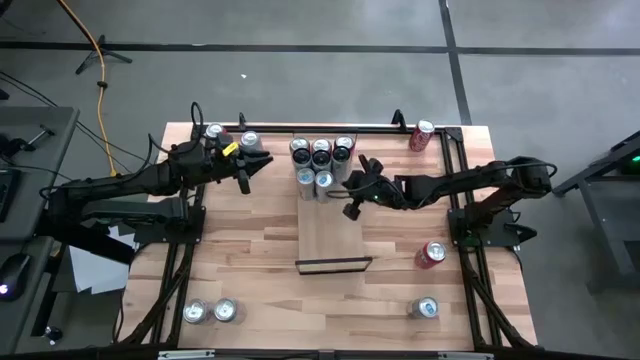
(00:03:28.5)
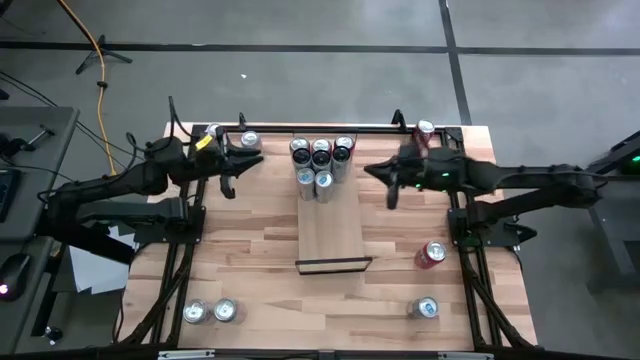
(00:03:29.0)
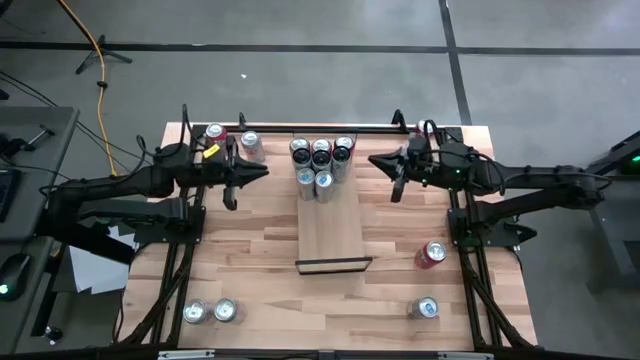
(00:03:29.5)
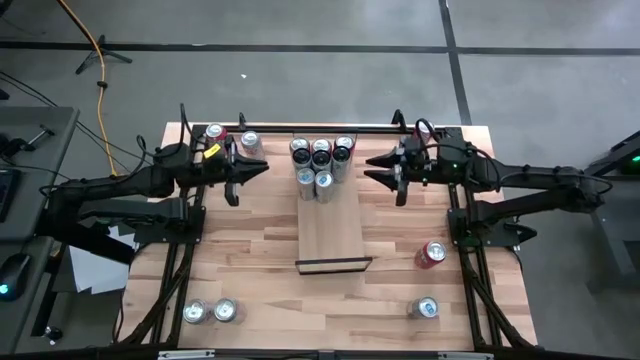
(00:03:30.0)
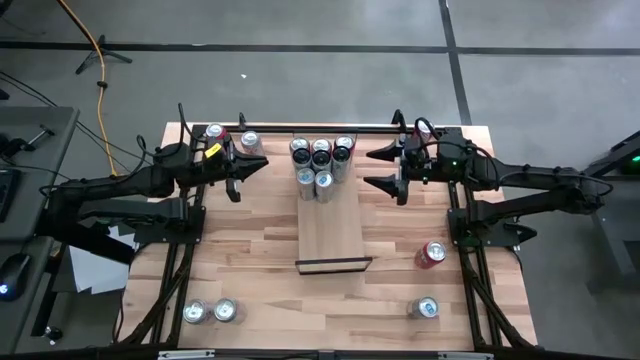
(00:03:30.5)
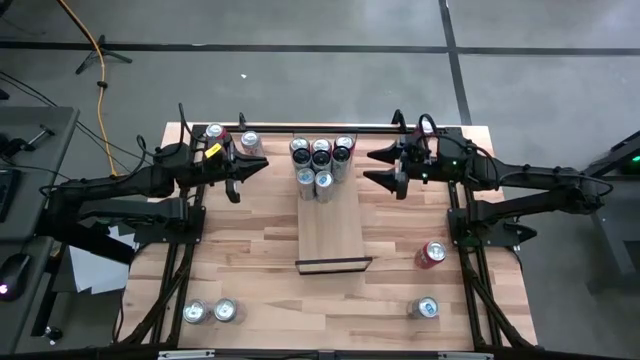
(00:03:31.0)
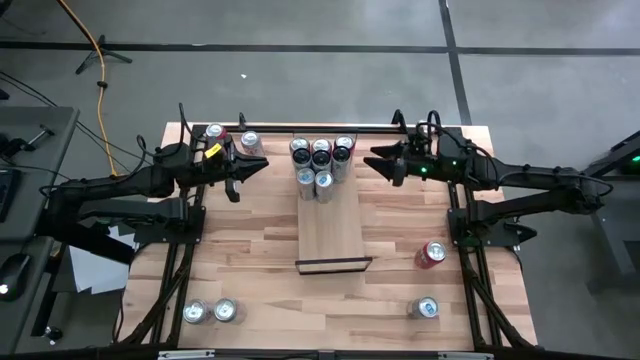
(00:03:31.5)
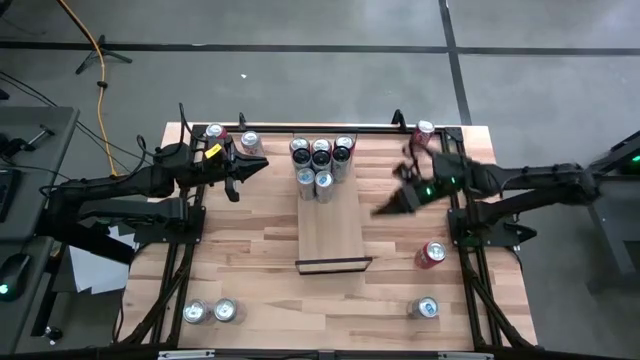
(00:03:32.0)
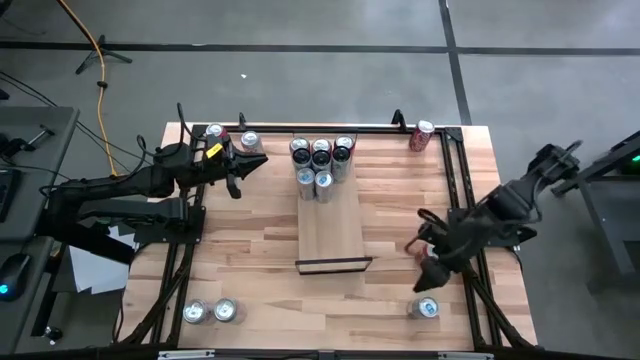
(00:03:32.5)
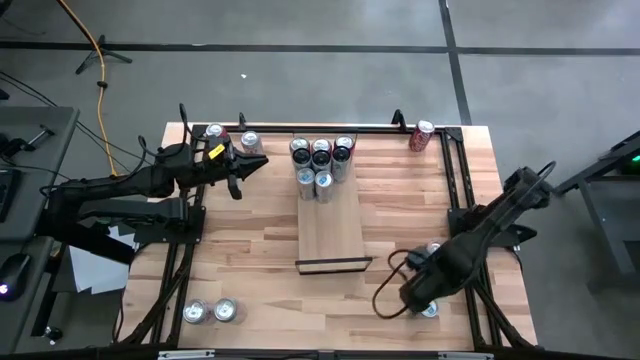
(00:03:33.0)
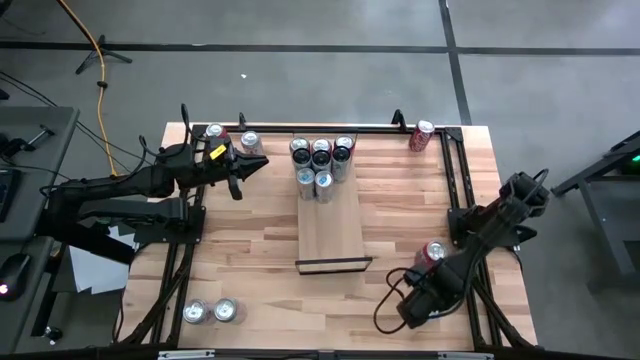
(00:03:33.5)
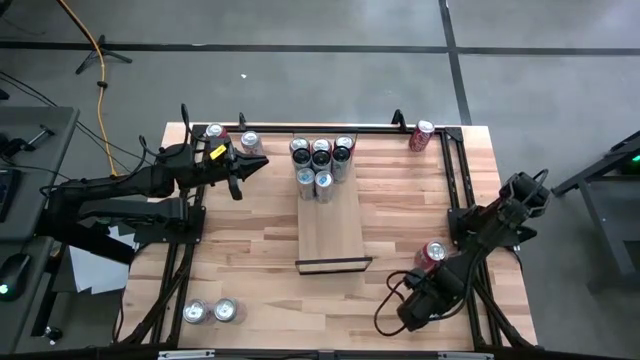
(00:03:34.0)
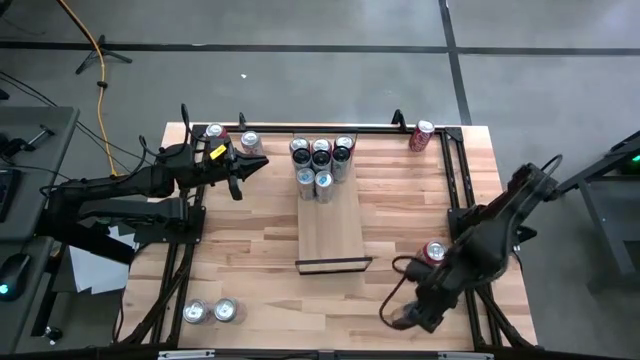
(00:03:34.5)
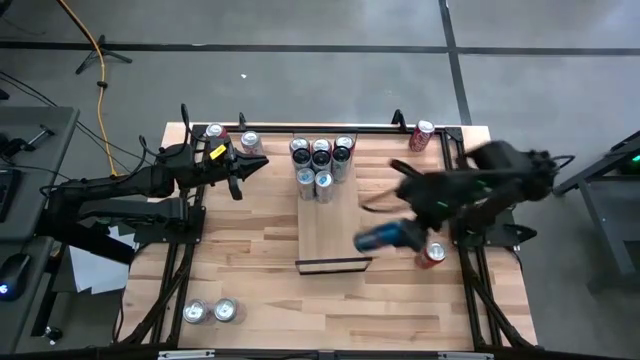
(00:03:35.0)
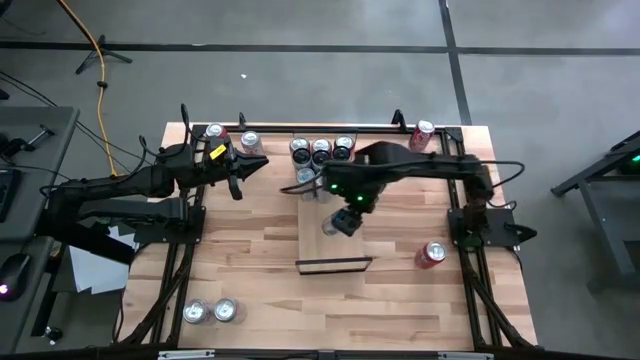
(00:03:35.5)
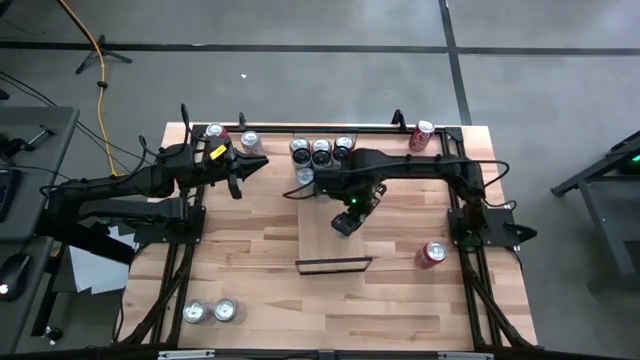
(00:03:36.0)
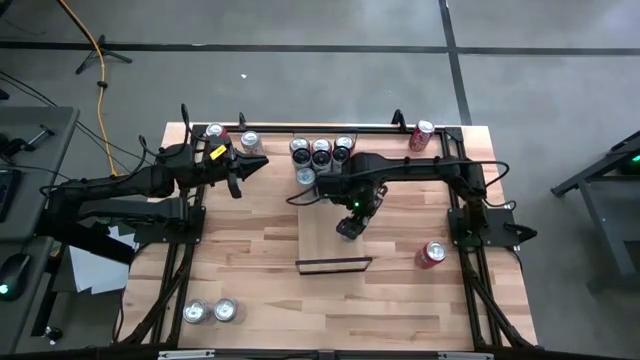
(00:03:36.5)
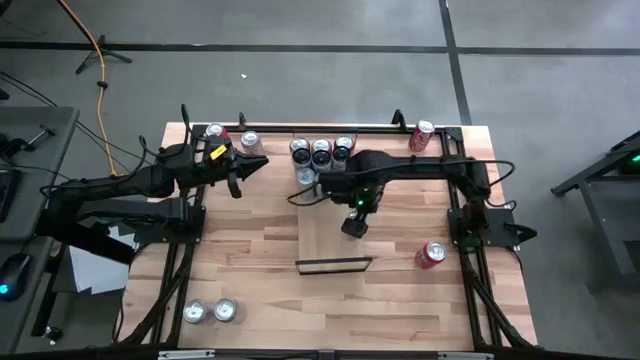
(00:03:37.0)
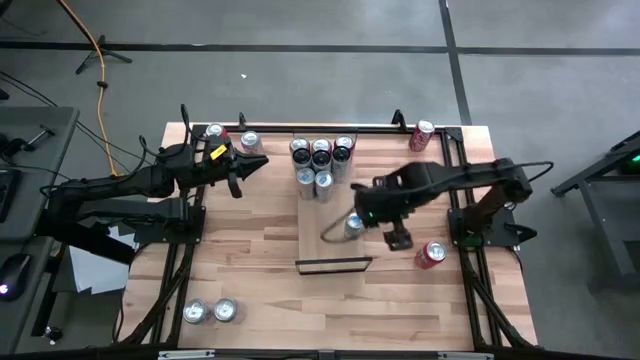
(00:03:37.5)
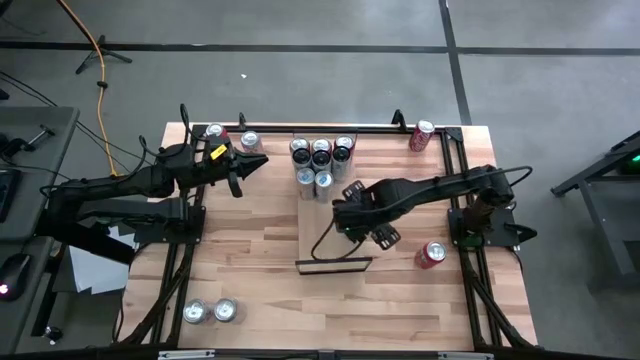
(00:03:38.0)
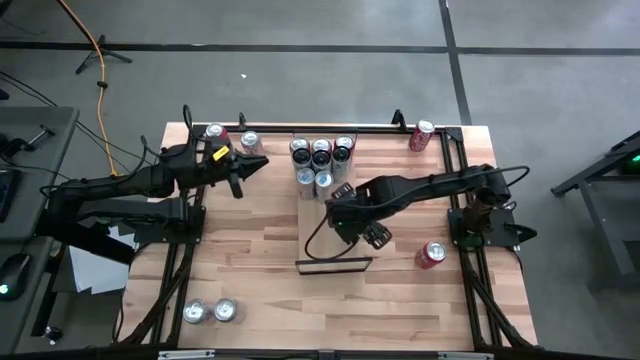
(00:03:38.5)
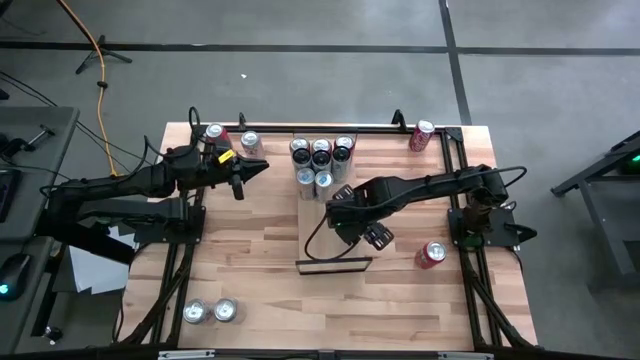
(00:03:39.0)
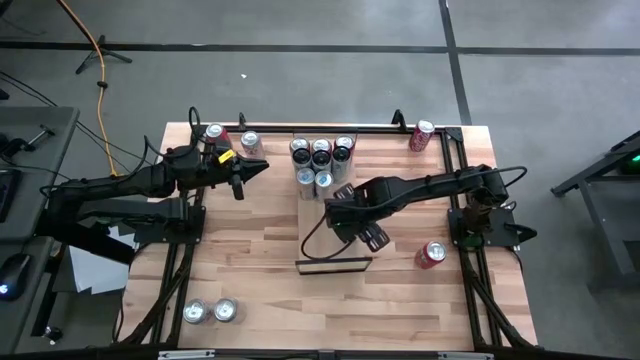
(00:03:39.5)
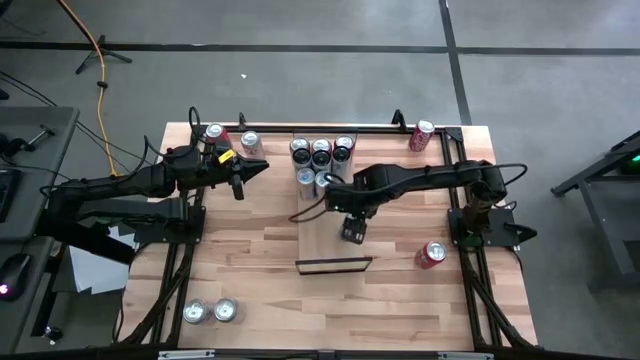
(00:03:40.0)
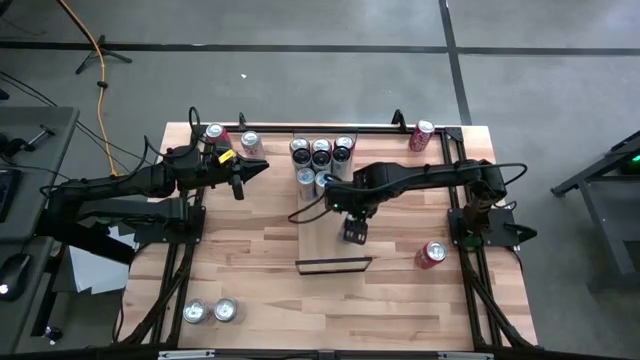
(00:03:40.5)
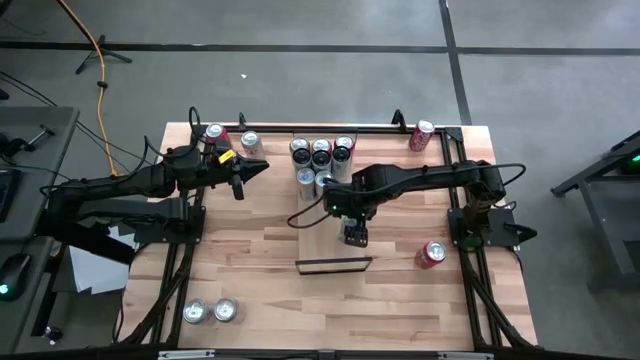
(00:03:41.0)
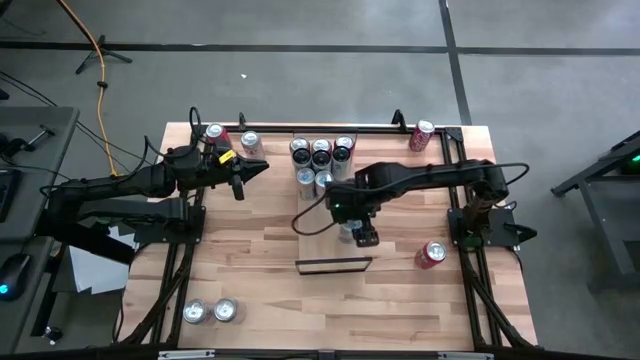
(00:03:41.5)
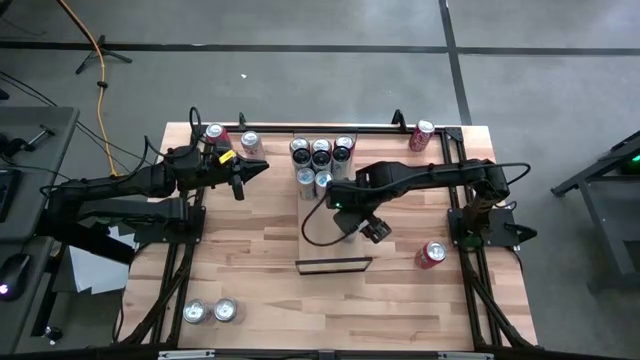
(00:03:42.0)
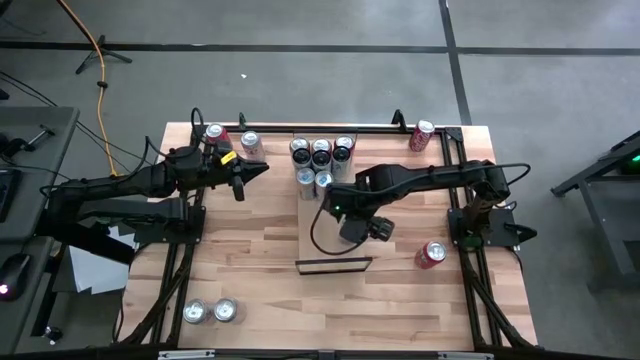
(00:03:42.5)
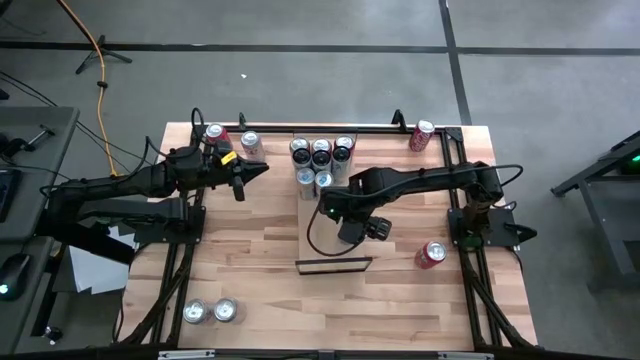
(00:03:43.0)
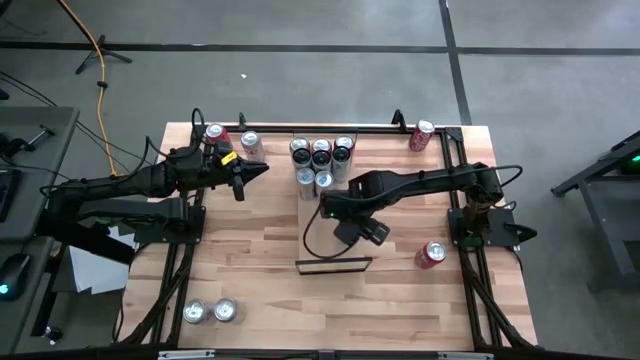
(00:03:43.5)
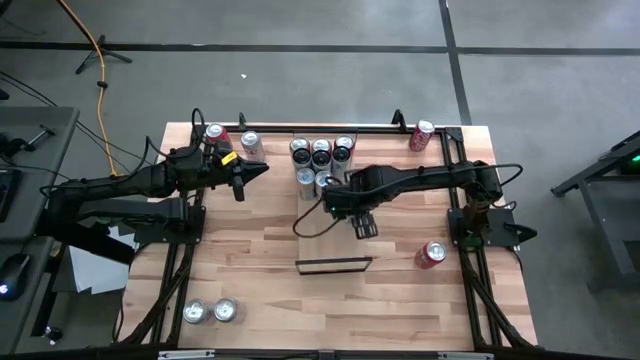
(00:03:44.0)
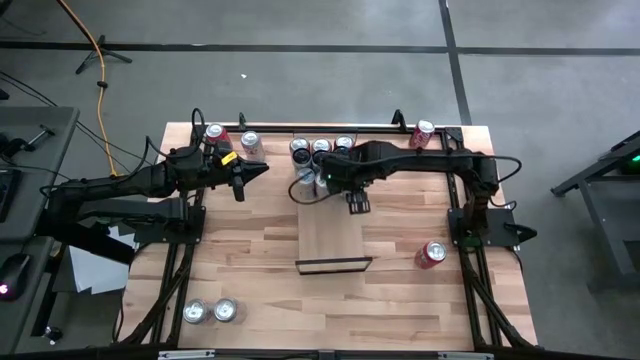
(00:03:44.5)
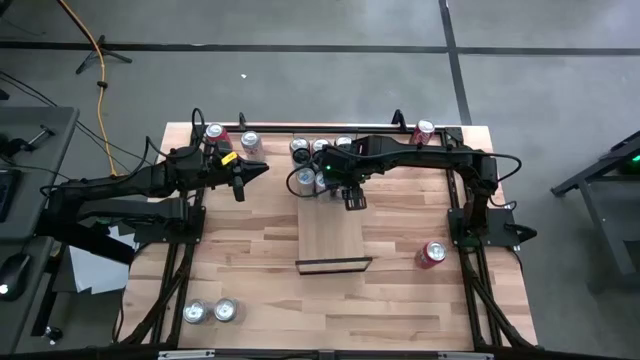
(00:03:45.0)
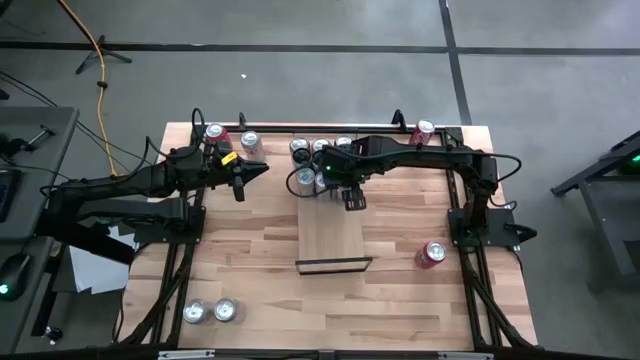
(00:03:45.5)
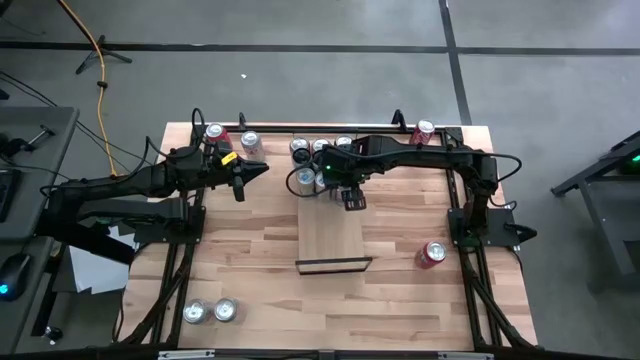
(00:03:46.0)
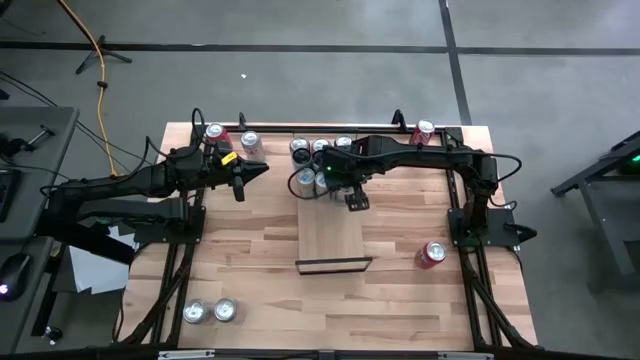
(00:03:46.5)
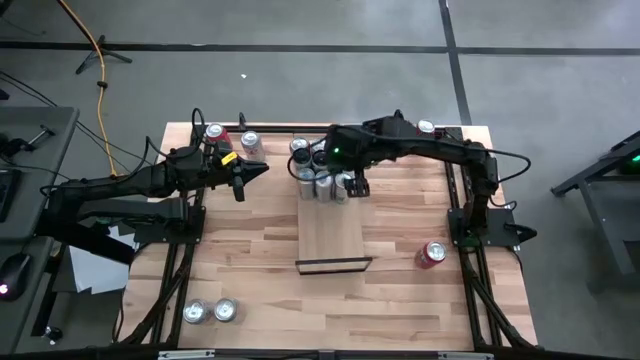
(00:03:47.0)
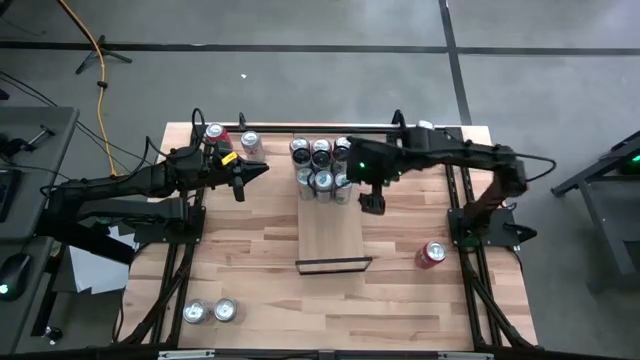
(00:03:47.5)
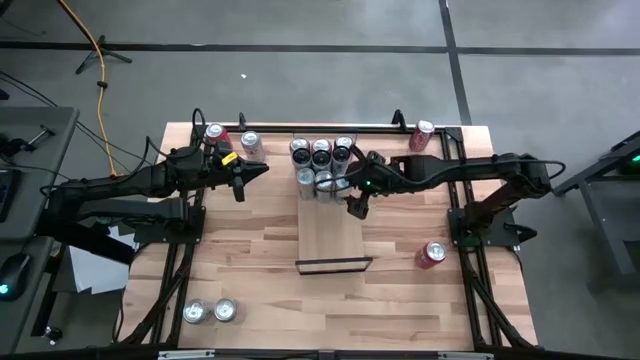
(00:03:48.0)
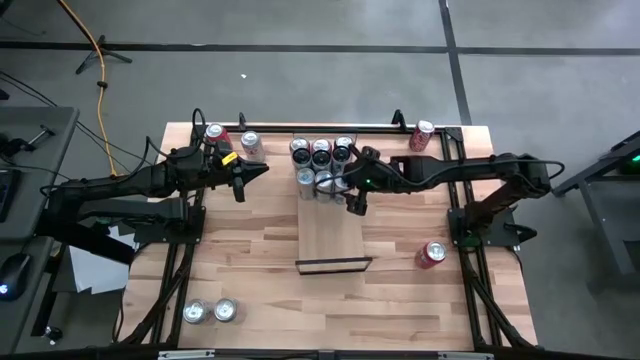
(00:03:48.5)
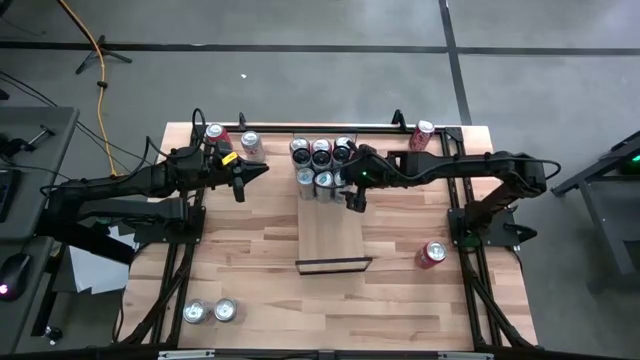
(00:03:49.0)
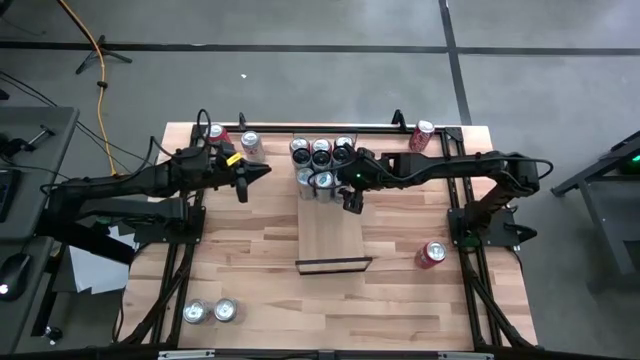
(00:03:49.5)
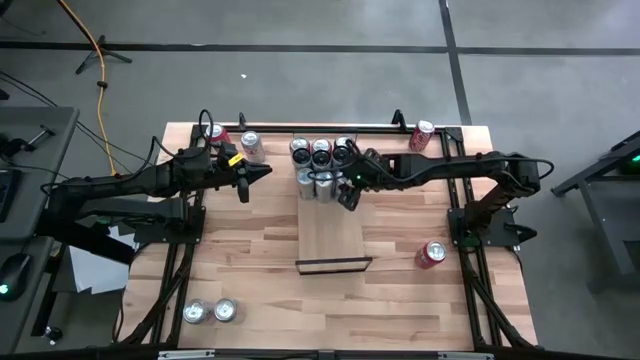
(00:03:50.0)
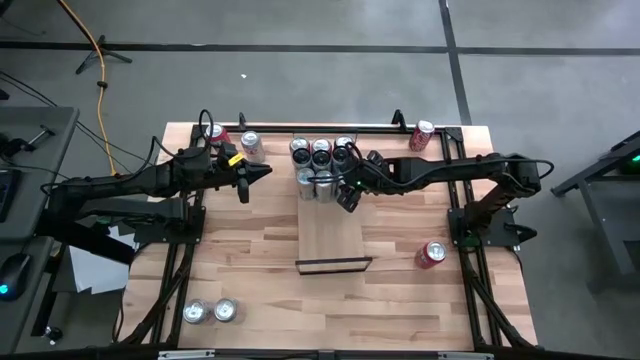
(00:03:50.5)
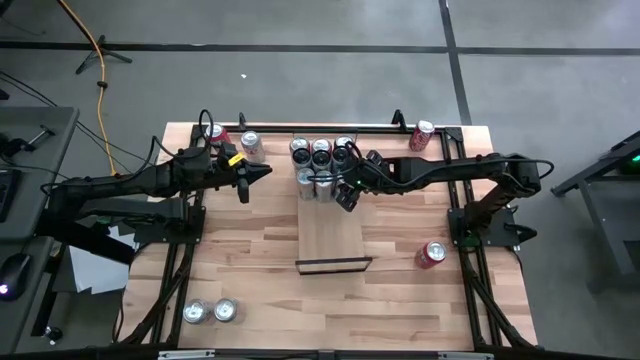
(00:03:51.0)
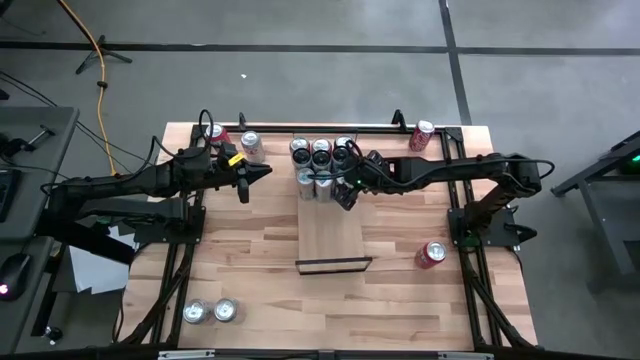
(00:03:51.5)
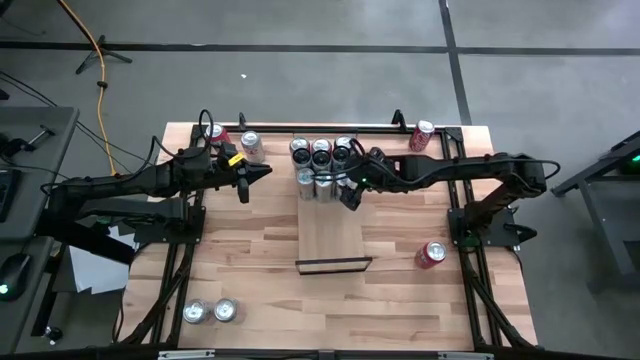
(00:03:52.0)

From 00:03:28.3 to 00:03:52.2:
Task: Place canned beverage on shelf
Put the blue soda can on the shelf aligned with the other blue soda can
